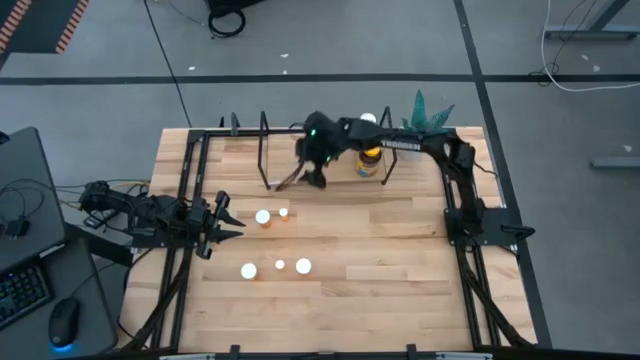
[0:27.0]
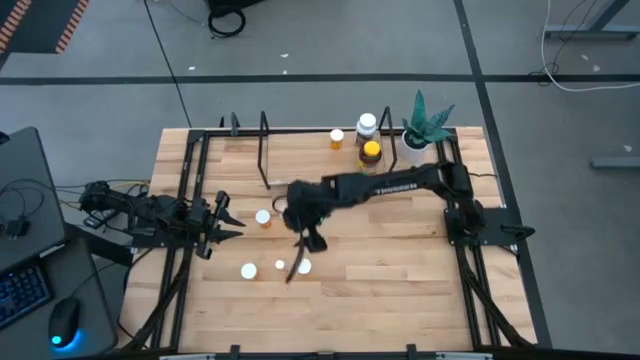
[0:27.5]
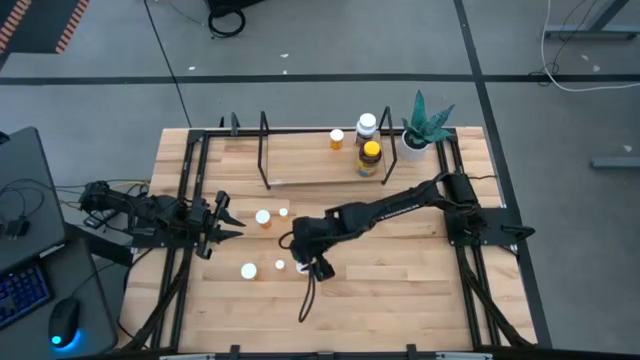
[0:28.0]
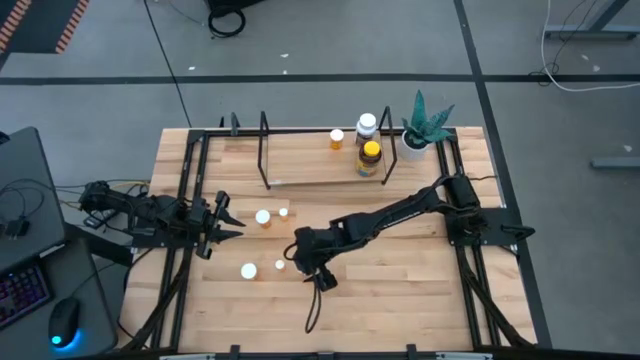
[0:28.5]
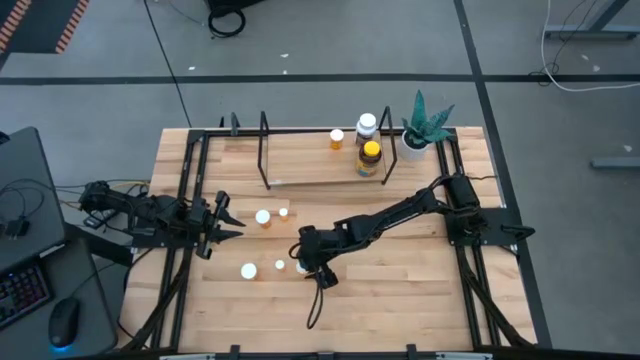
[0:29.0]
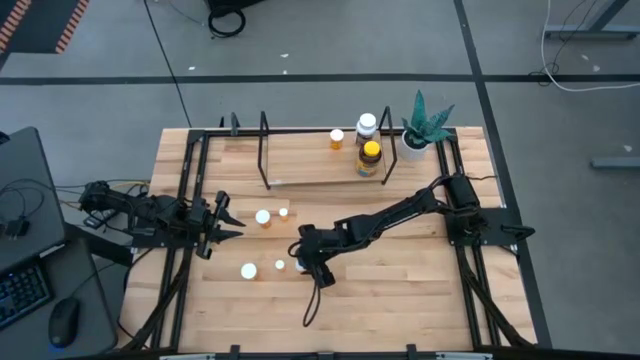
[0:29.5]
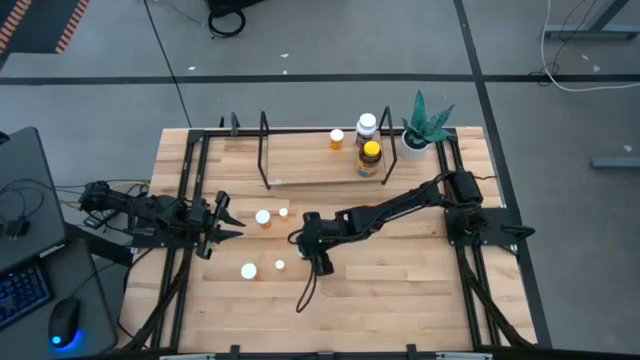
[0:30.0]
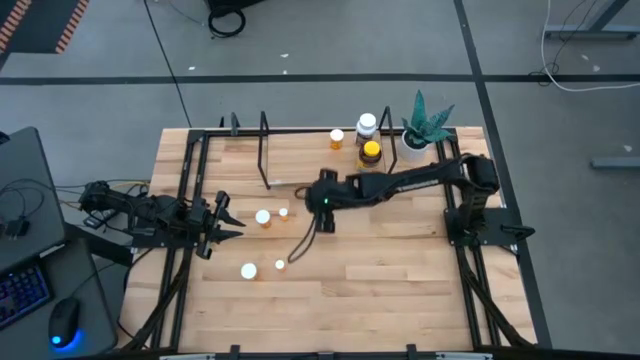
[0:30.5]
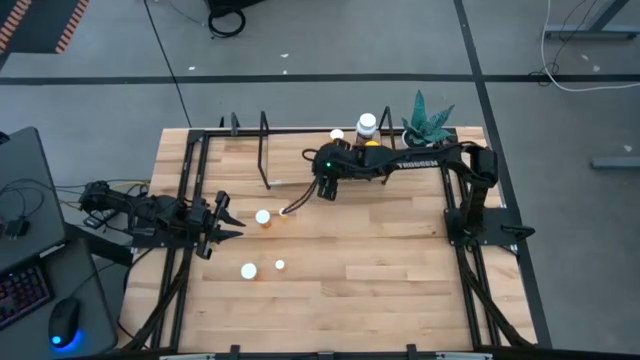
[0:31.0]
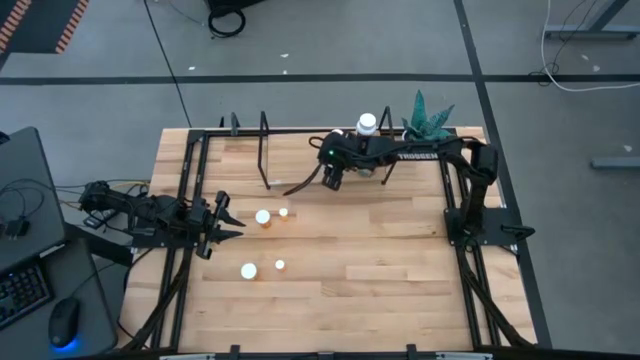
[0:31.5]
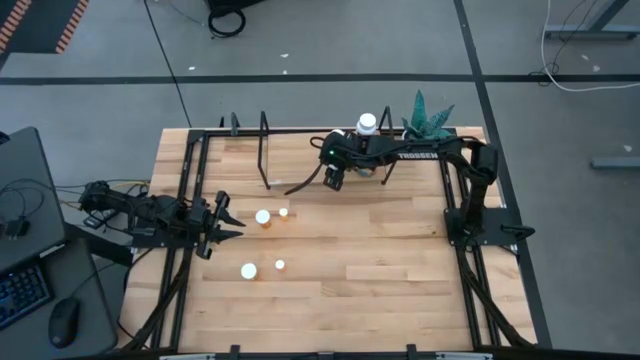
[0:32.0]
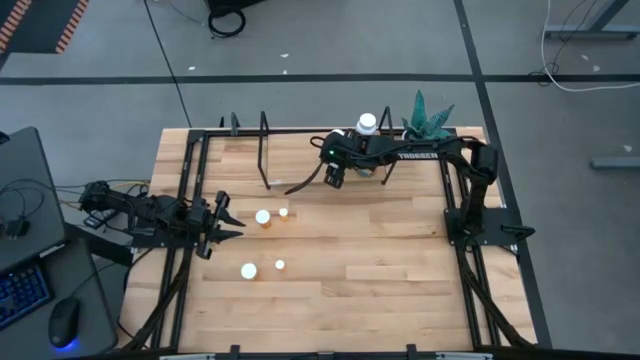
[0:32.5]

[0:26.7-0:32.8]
Task: Pick and place medicine bottles onto shelf by color
Align the large orange bottle with the large orange bottle on the shelf

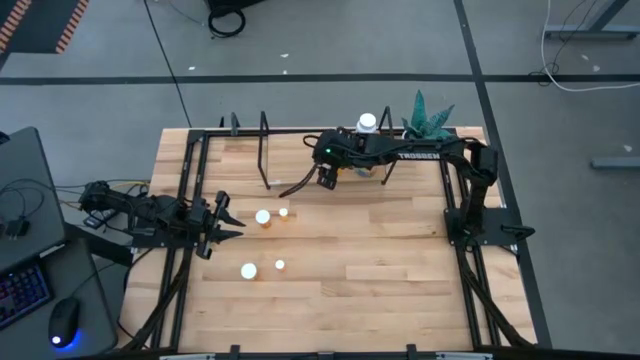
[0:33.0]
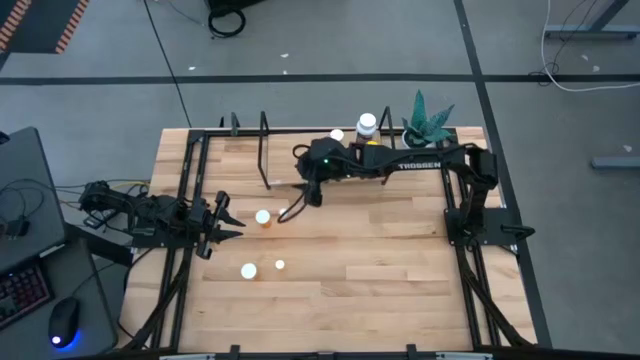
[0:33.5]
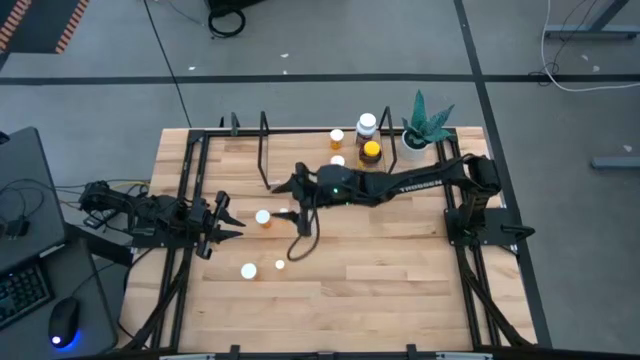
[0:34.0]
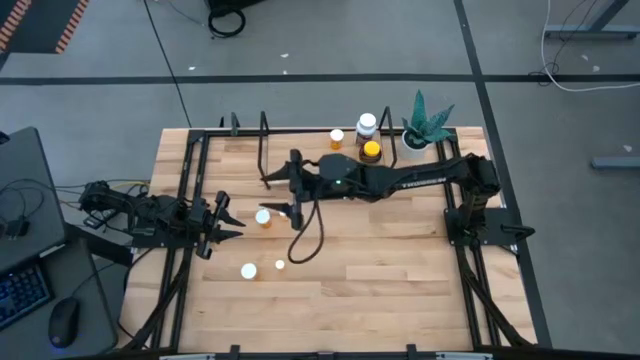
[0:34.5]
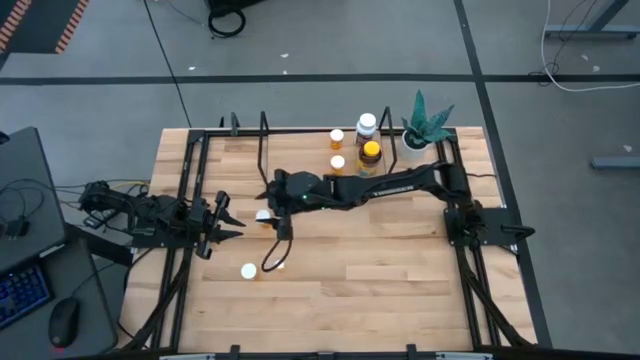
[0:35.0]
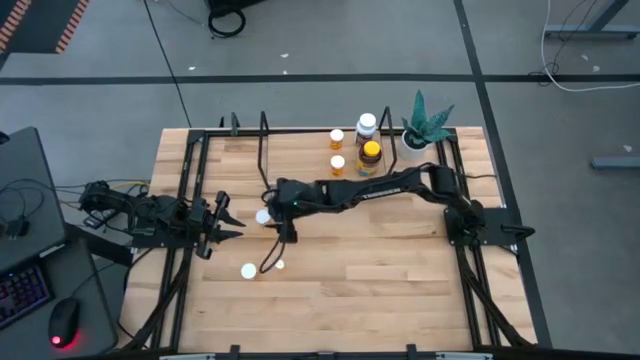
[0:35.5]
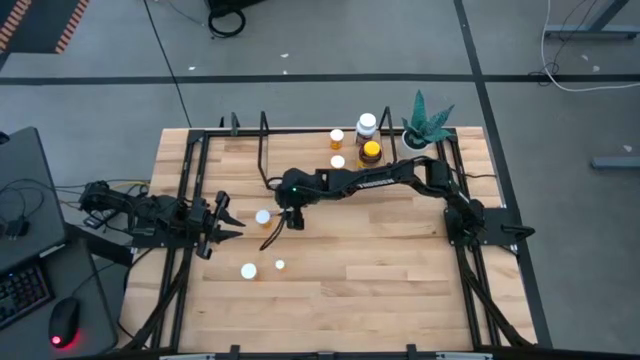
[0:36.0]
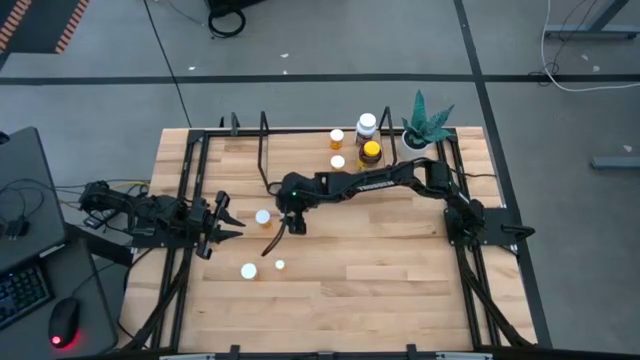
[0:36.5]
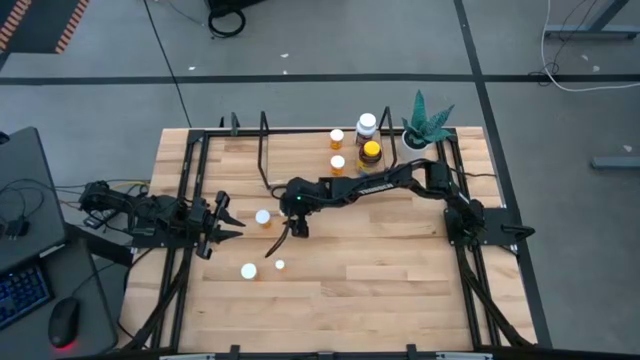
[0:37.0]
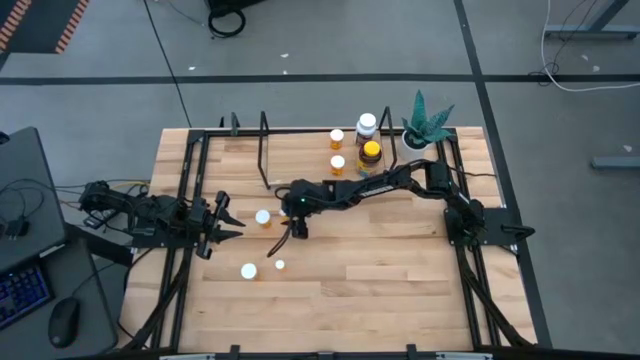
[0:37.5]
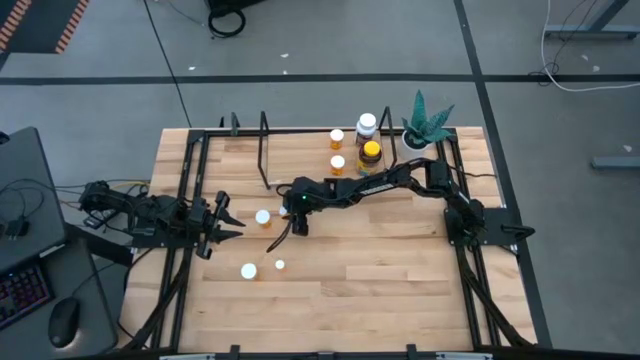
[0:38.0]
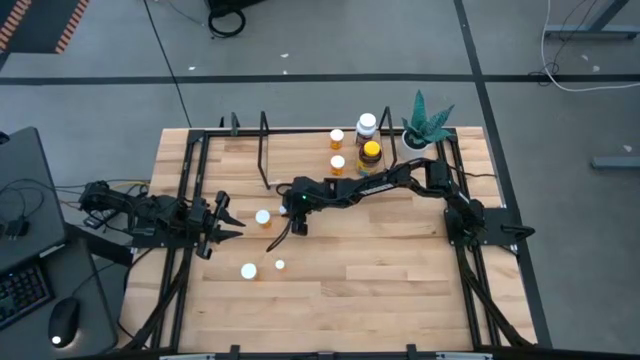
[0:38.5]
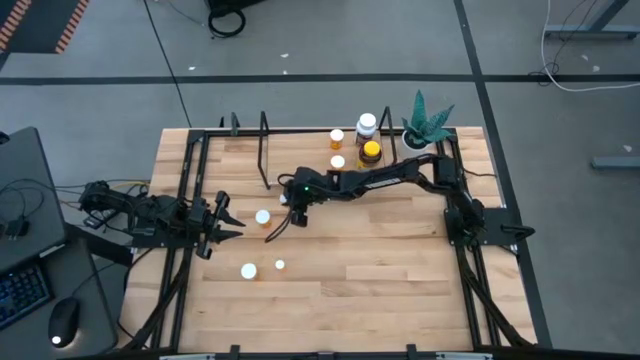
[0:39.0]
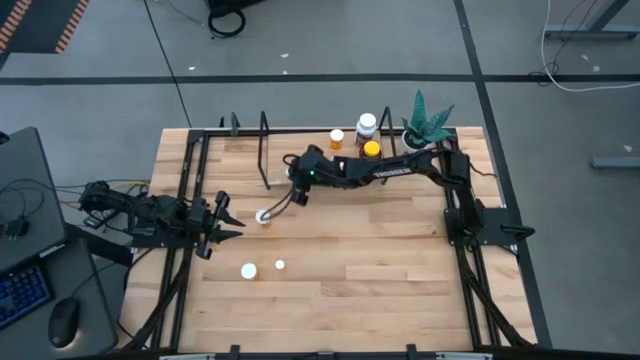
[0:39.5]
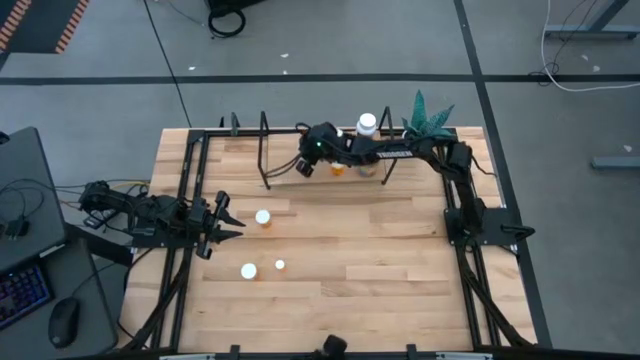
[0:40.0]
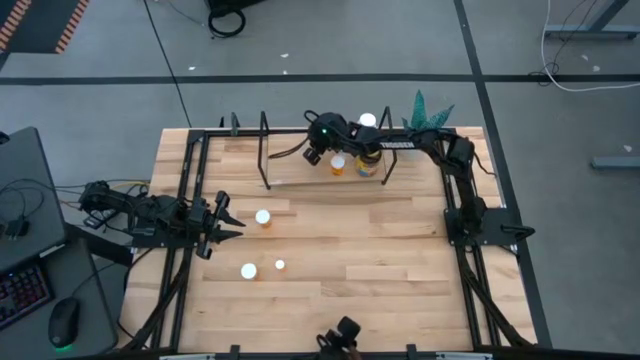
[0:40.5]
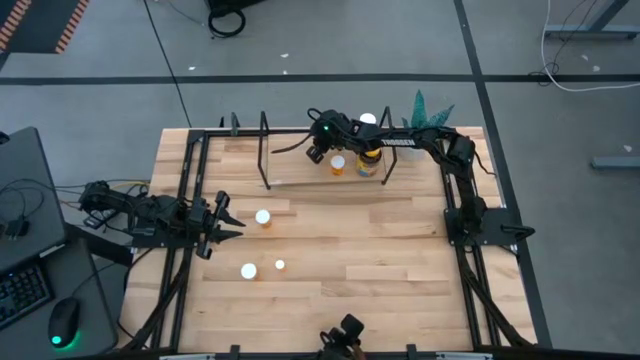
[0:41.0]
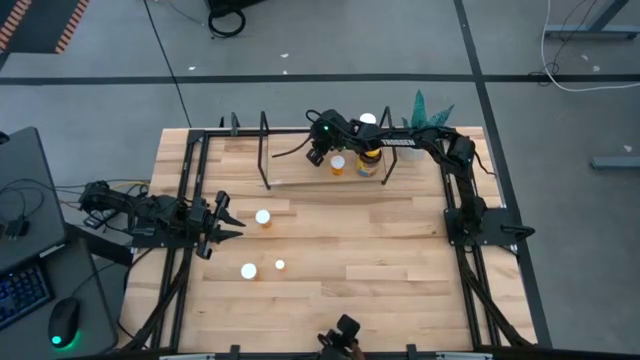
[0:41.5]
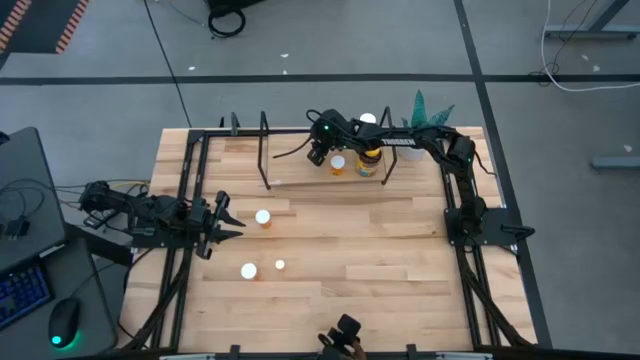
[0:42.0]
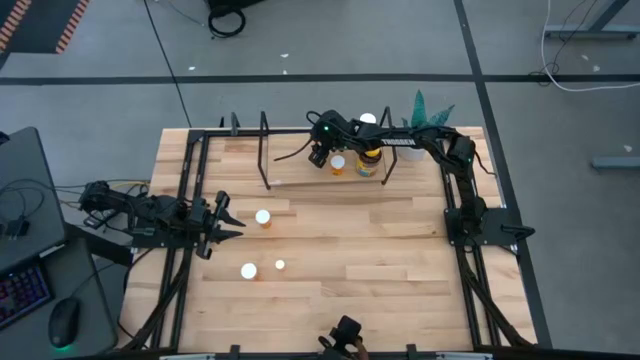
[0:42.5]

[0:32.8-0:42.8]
Put the small orange bottle on the shelf

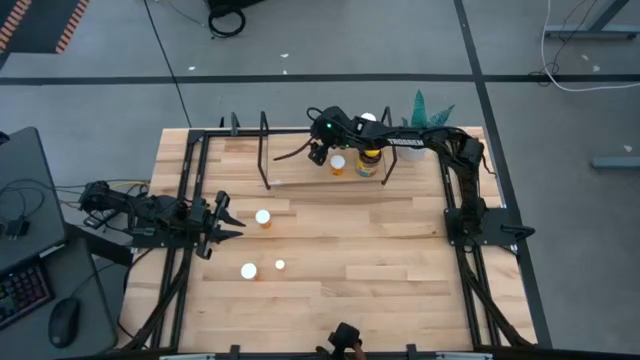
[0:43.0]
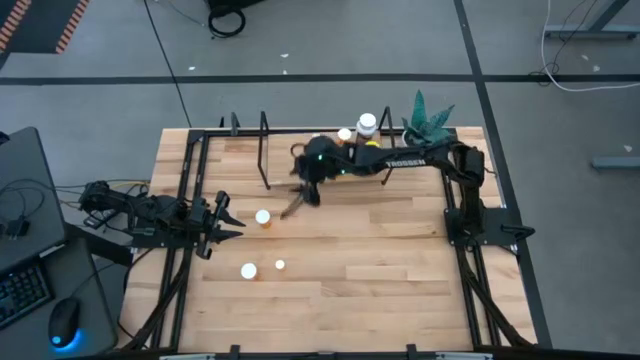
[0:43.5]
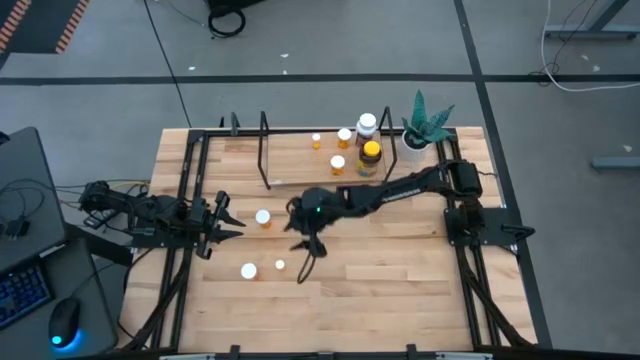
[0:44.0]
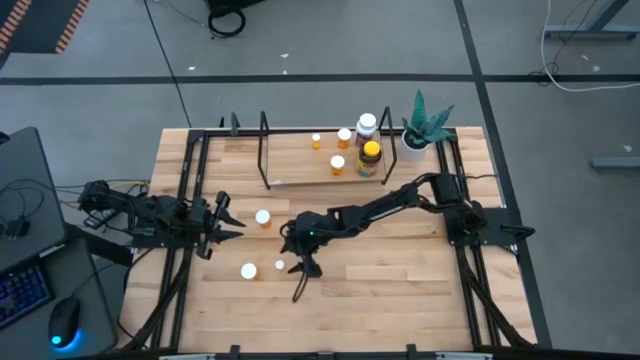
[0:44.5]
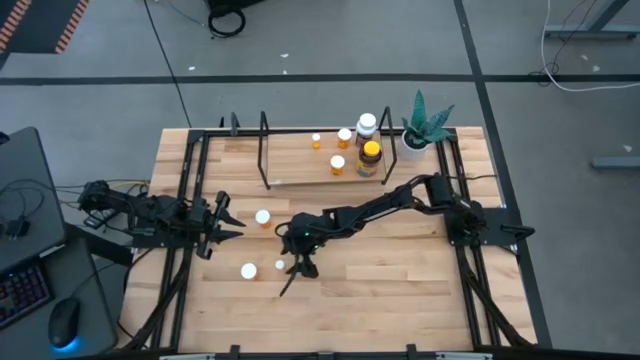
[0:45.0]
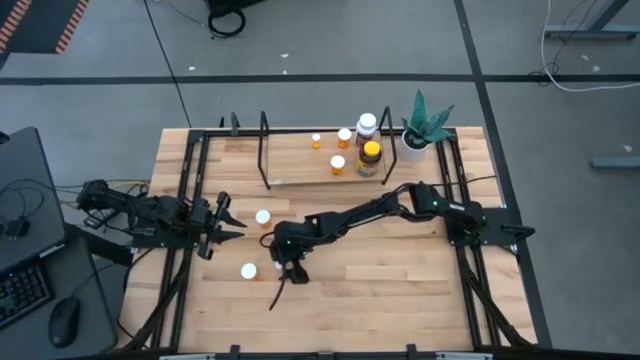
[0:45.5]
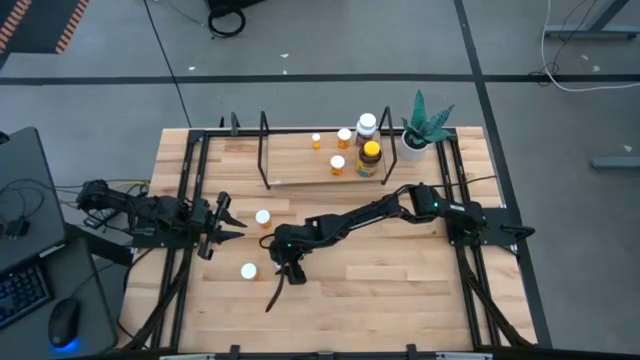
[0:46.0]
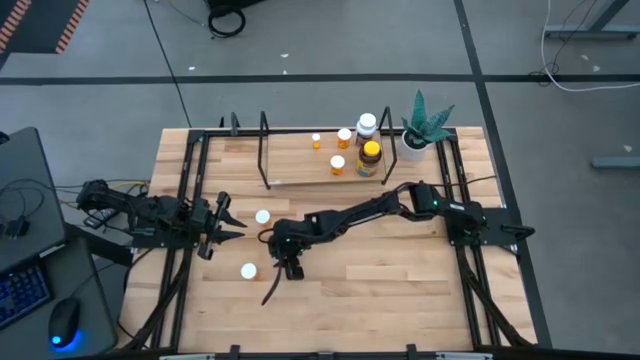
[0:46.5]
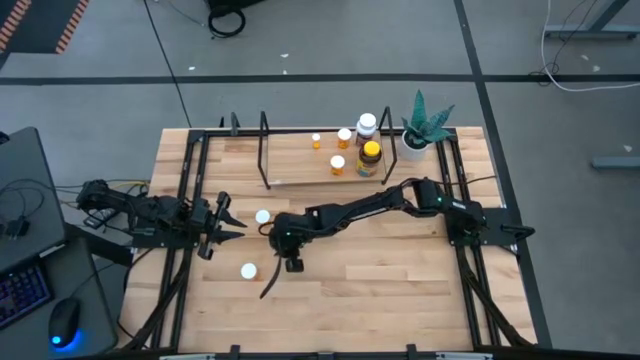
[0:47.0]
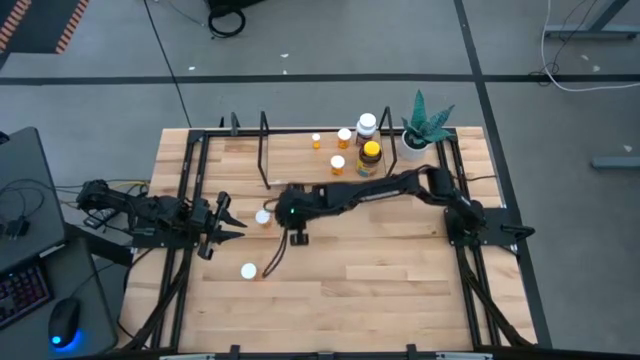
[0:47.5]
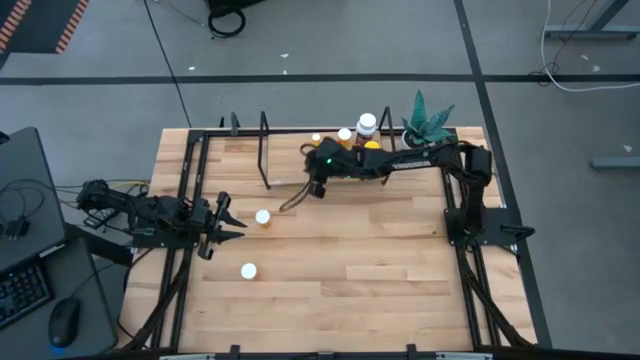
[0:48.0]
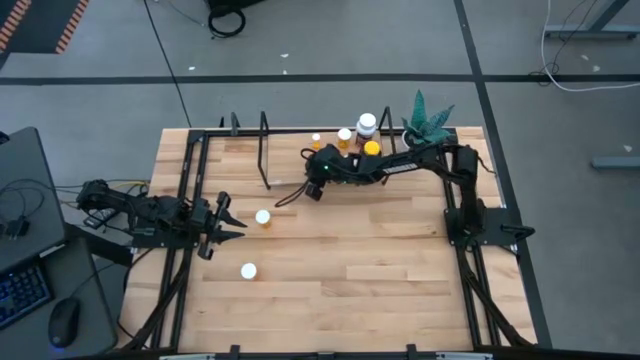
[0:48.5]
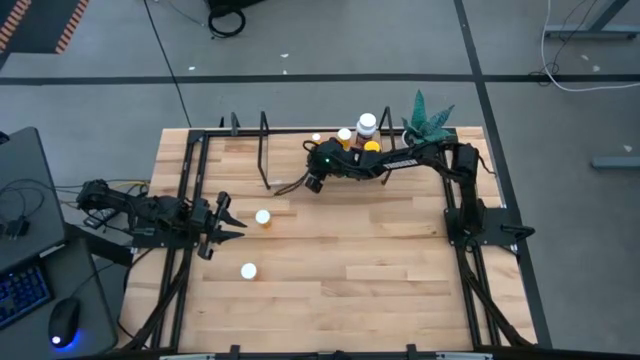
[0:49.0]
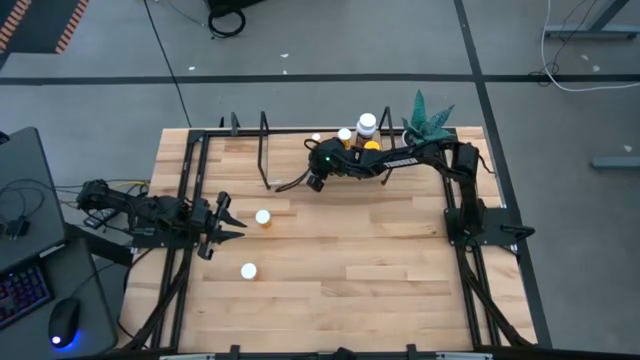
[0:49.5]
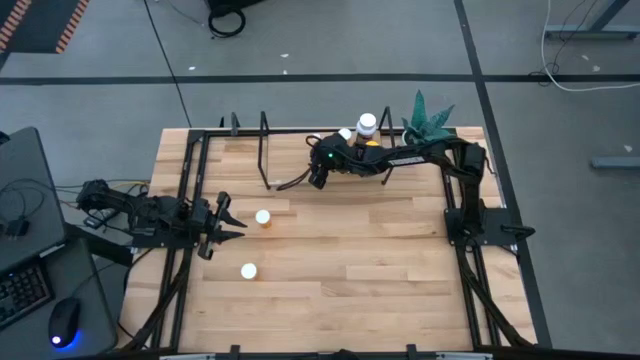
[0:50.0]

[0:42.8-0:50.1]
Align the small orange bottle with the small orange bottle on the shelf
